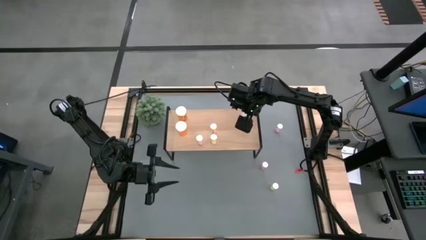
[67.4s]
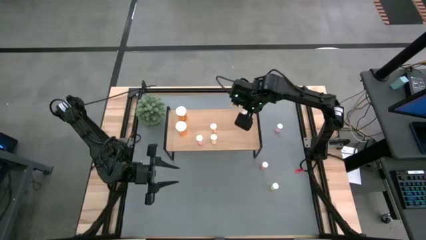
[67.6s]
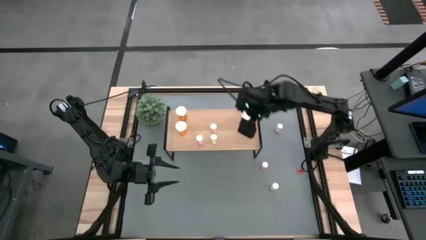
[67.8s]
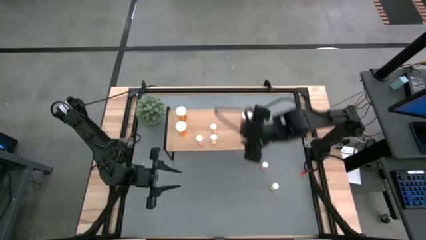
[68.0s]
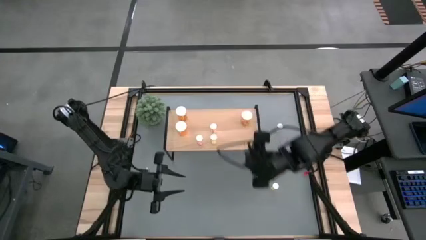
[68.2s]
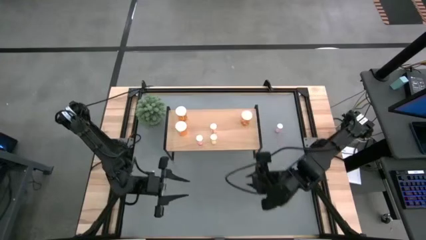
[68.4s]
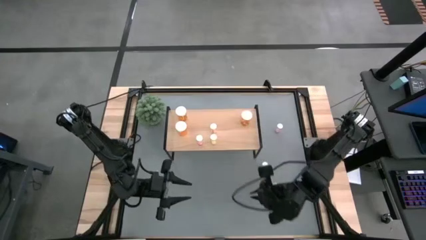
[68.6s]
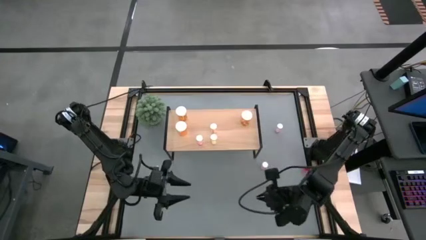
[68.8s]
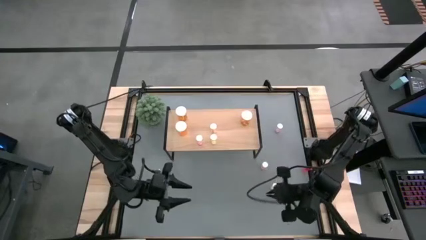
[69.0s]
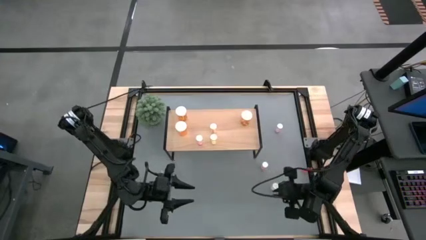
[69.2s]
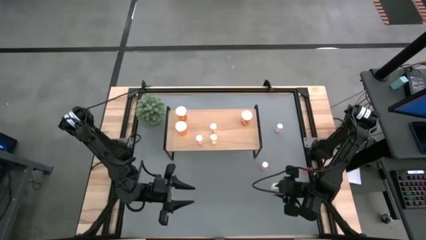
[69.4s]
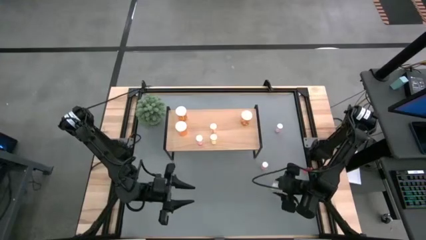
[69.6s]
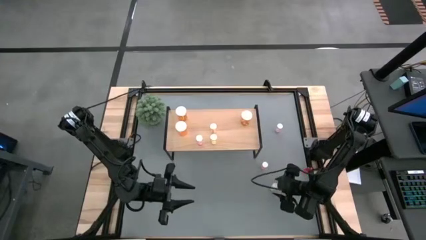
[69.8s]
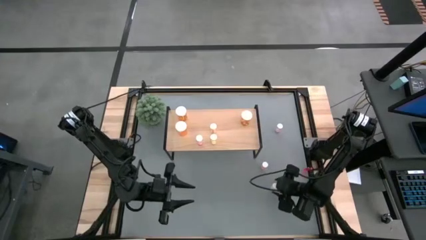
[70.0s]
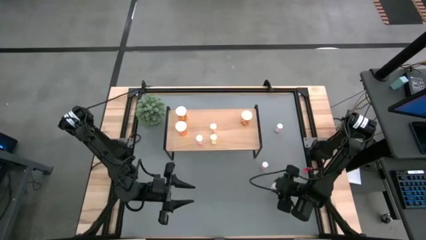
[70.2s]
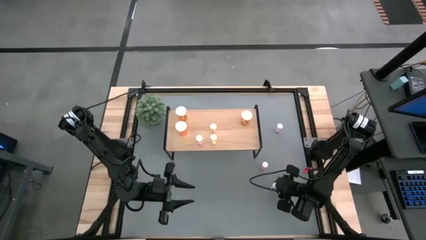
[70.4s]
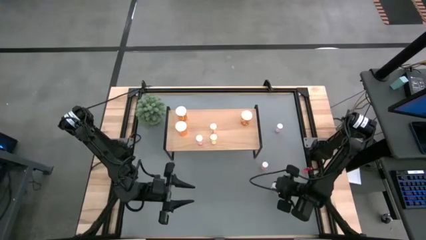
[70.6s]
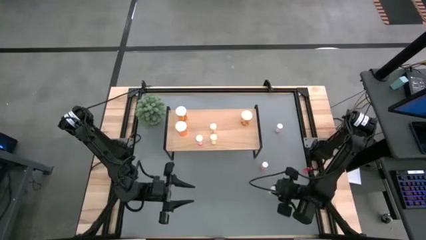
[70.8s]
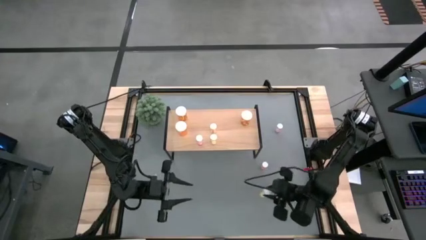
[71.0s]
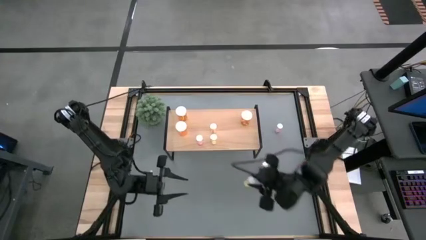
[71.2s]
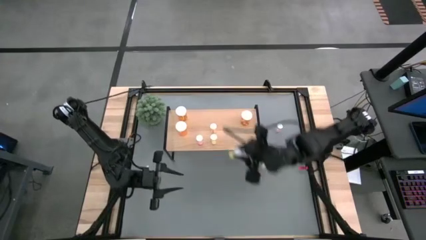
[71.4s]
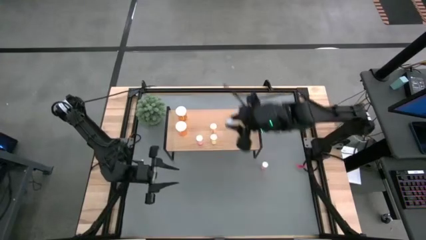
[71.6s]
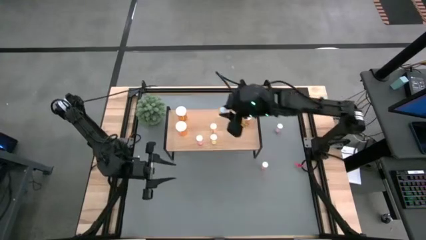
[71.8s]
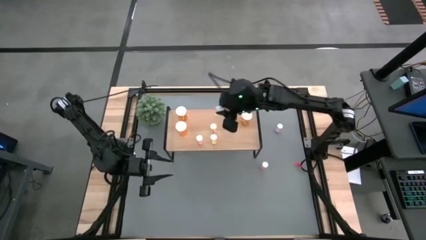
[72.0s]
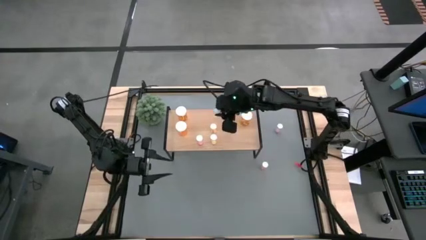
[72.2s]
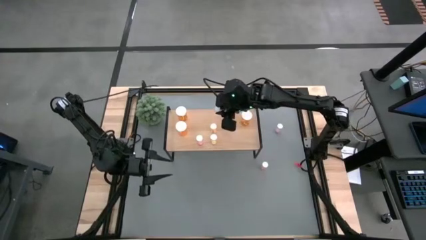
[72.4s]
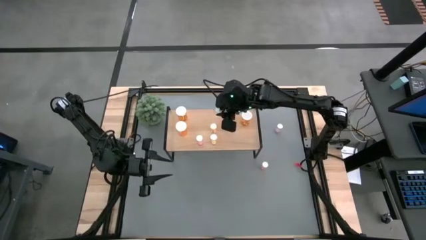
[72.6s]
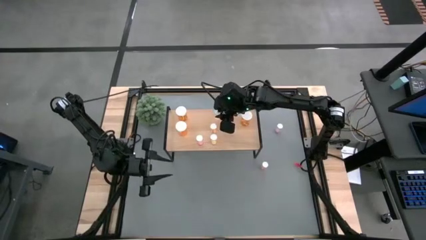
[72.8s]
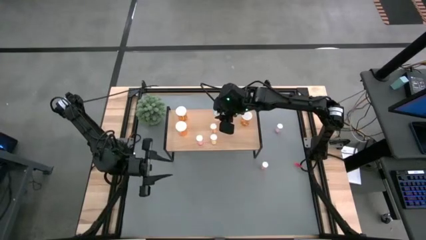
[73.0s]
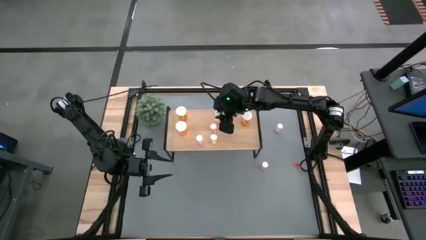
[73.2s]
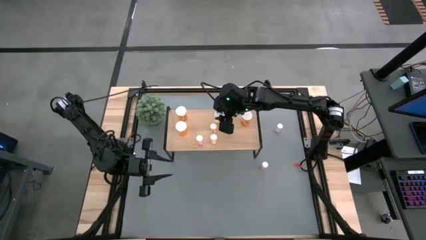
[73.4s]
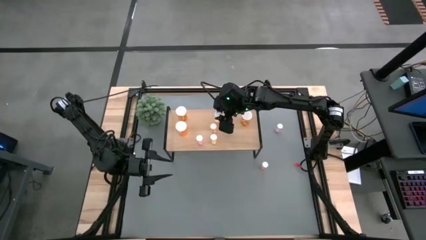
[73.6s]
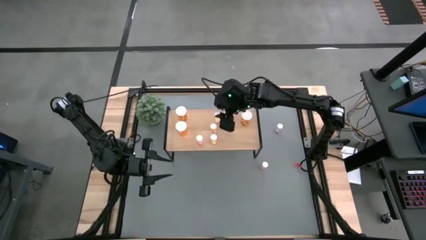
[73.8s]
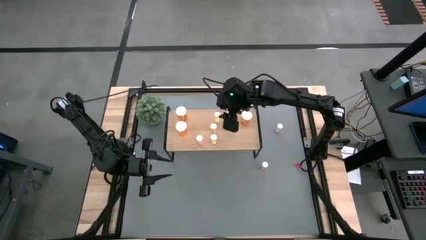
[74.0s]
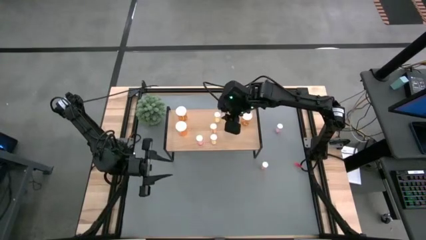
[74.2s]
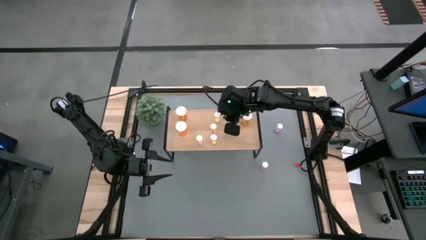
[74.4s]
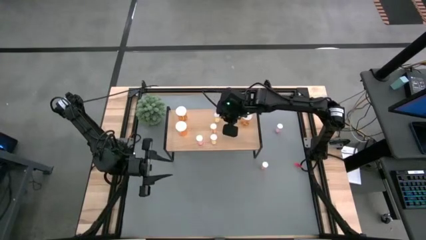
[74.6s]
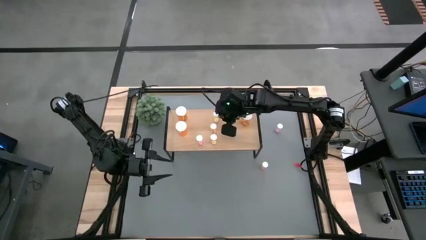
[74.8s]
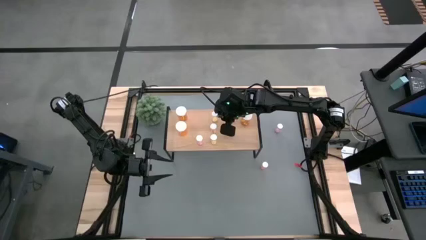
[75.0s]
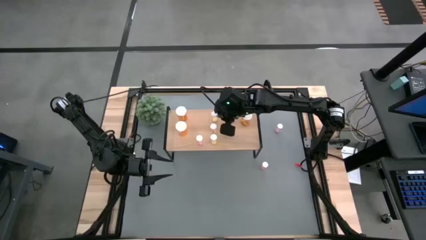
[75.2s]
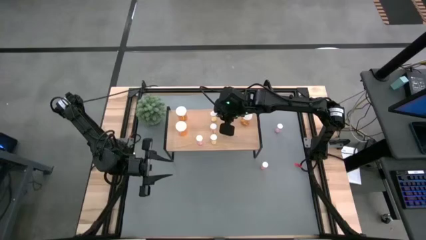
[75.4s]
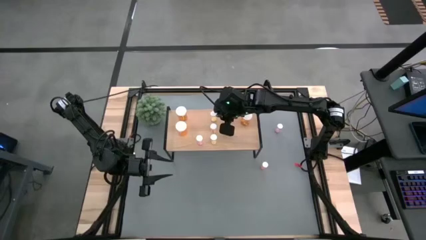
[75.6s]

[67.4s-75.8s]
Task: Pick and place medicine bottles onto shelf by color
Put the yellow pill bottle on the shelf aligned with the other yellow pill bottles

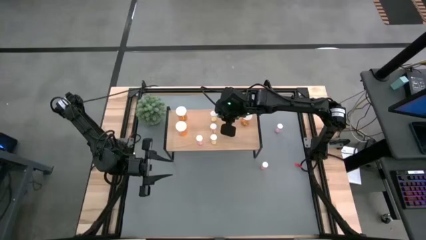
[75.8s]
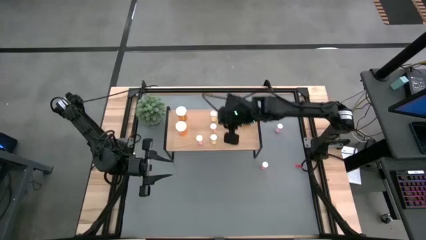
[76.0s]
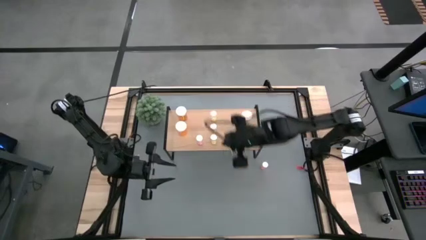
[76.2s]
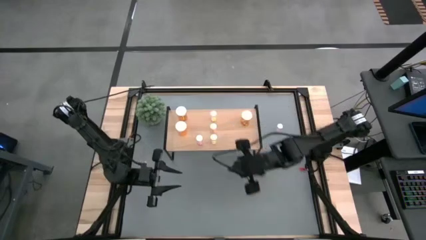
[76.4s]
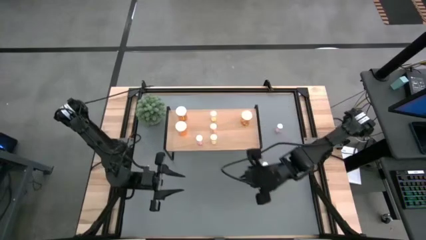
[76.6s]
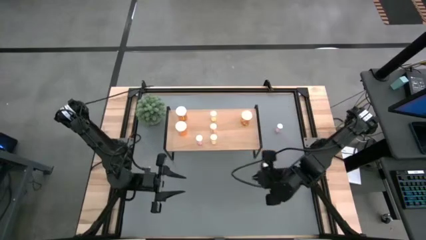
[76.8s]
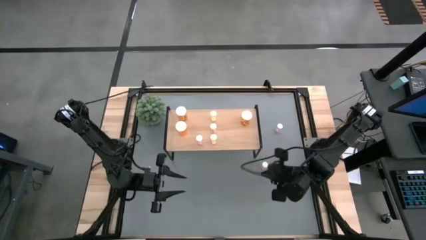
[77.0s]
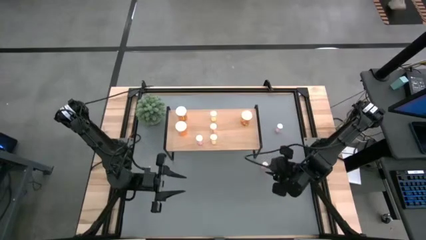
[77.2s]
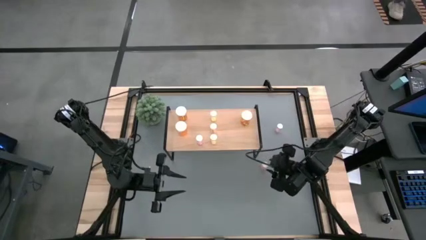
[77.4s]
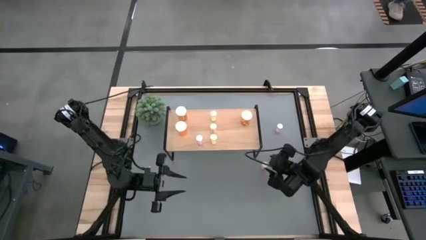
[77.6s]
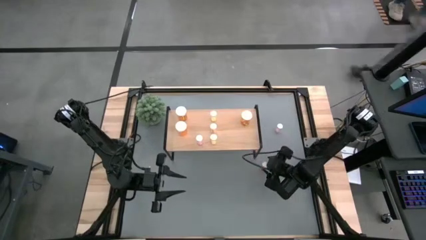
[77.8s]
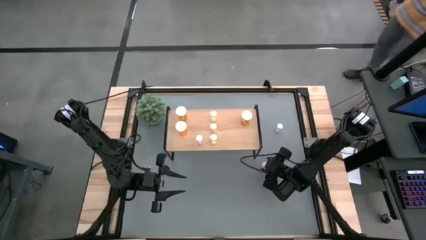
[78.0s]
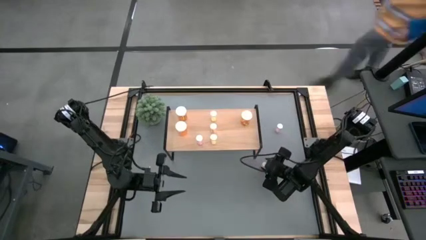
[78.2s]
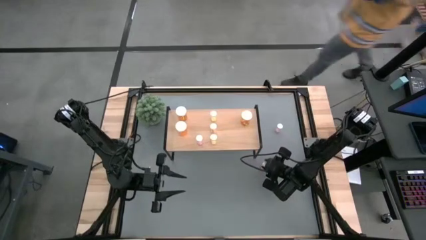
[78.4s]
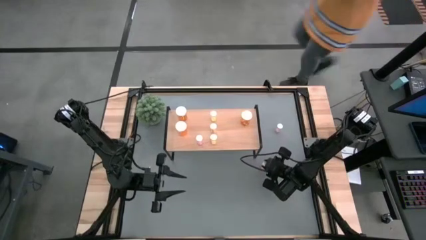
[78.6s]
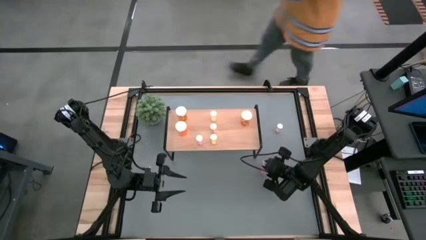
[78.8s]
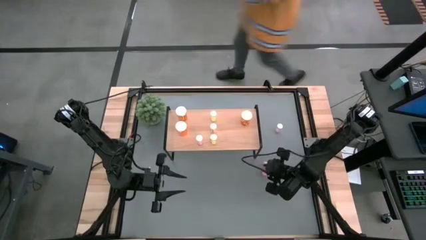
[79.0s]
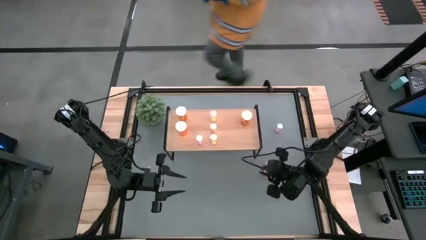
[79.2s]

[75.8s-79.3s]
Put the pink pill bottle on the shelf

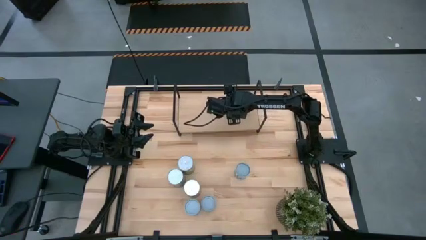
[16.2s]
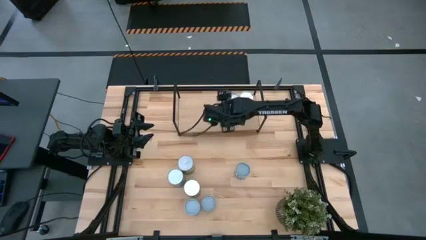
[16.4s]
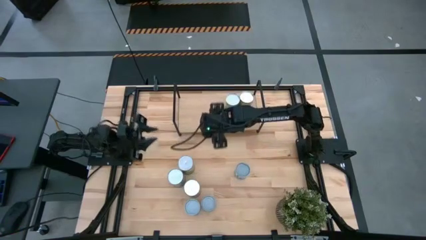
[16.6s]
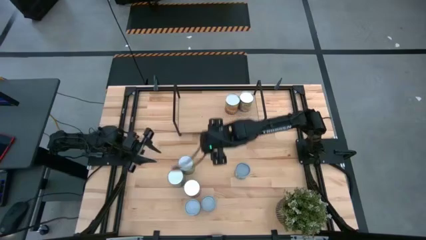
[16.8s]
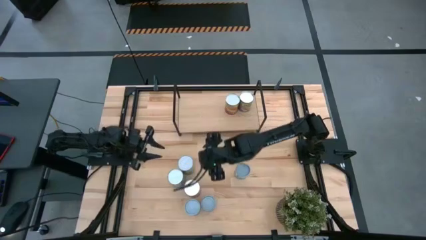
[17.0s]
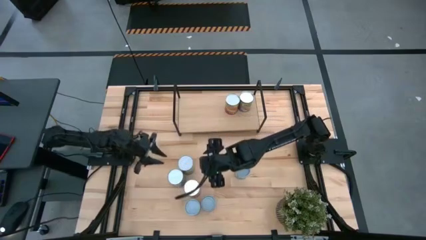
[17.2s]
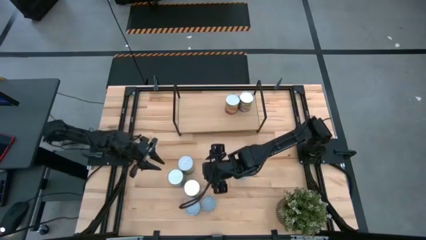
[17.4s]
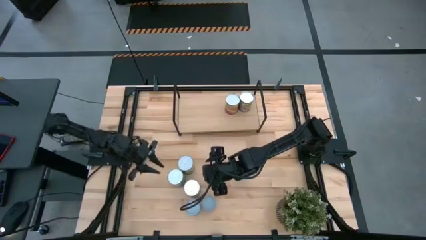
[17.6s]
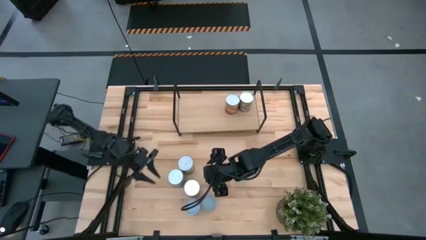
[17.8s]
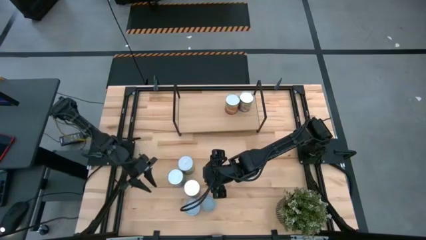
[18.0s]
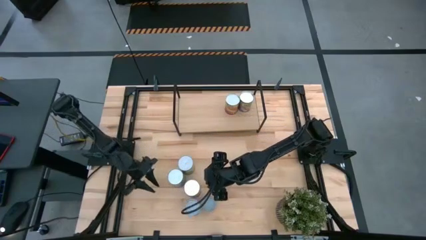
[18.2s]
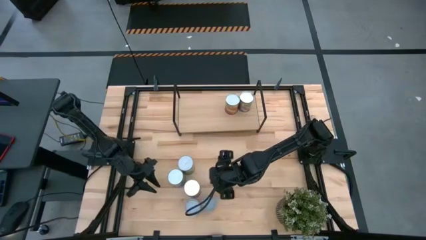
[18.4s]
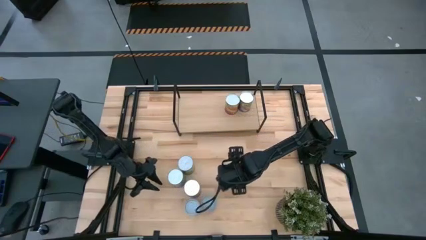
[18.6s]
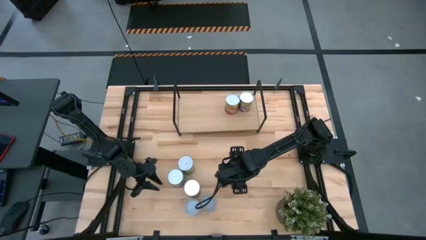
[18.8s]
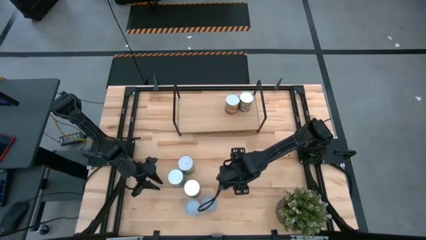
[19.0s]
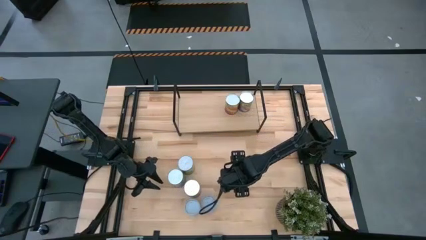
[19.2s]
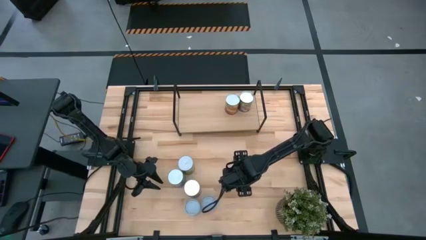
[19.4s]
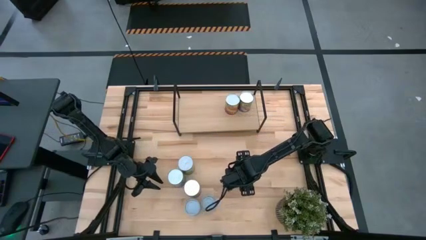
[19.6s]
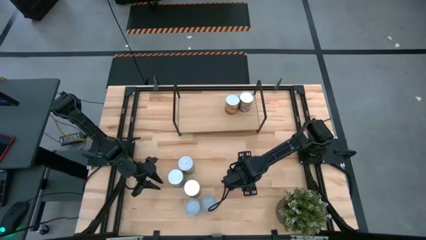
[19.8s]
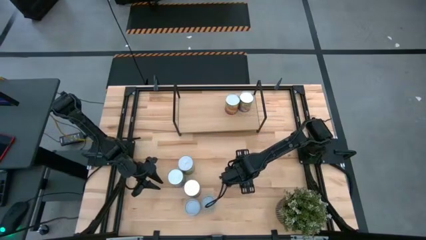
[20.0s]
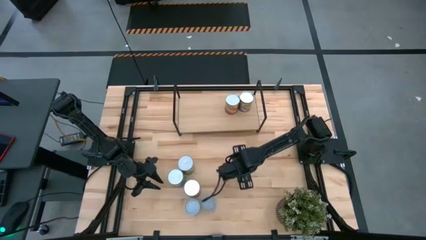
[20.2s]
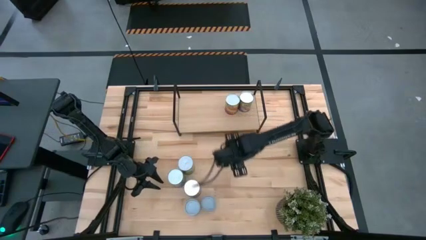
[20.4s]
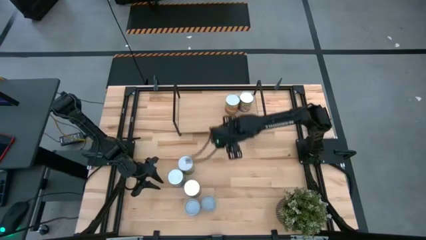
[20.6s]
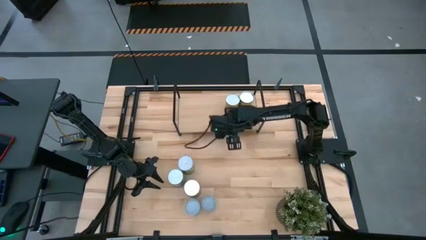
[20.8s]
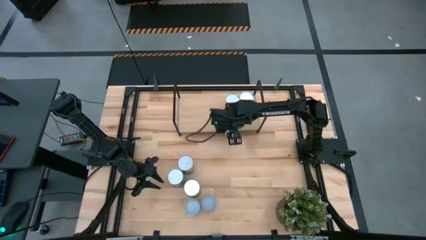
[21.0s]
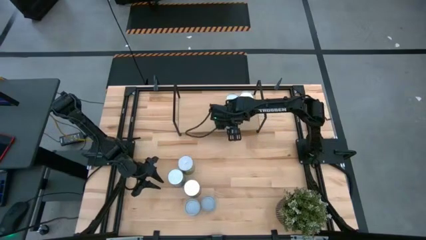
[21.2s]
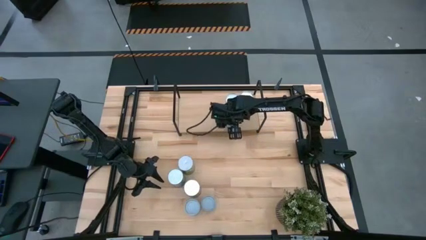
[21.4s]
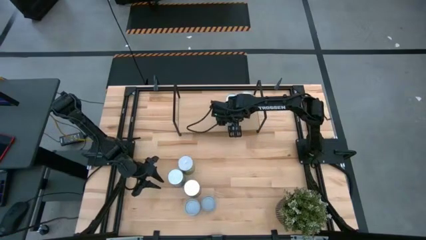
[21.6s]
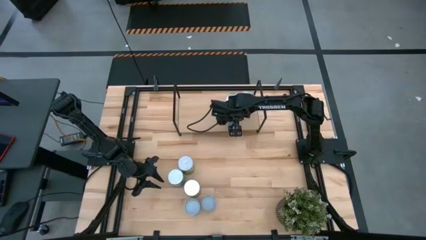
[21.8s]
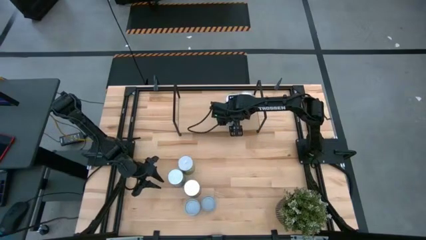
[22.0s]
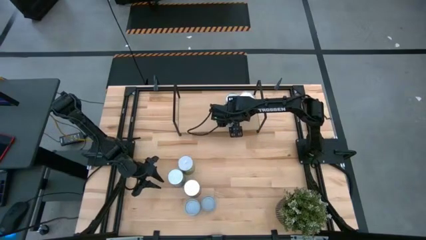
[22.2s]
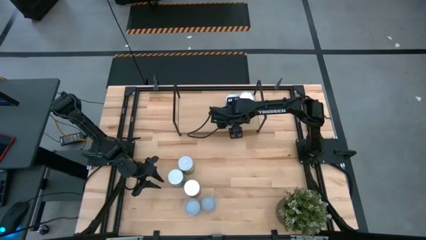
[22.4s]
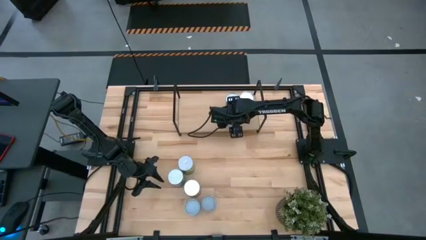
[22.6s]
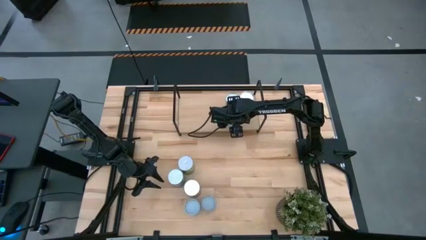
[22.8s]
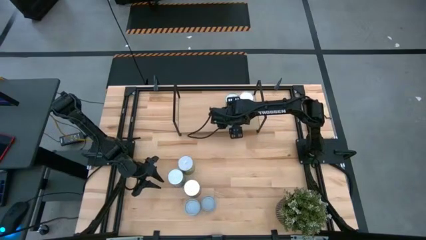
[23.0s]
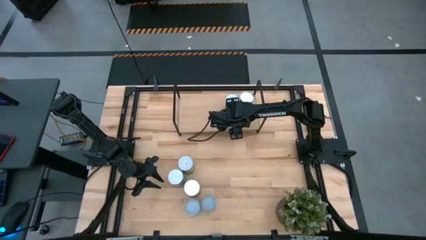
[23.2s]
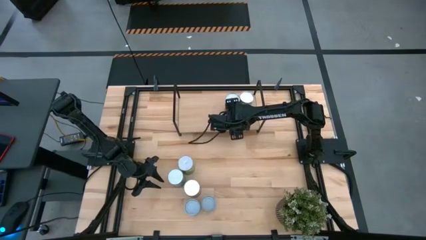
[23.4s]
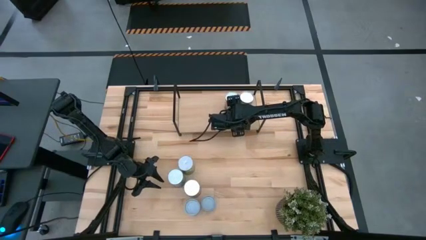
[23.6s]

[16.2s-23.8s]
Task: Pick and place cans onto a shelf
Put the canned mixed vegetables on the shelf
